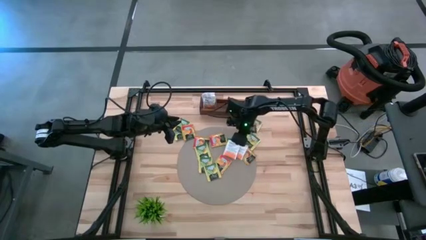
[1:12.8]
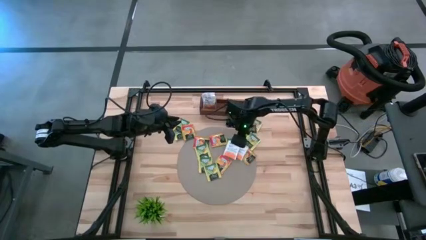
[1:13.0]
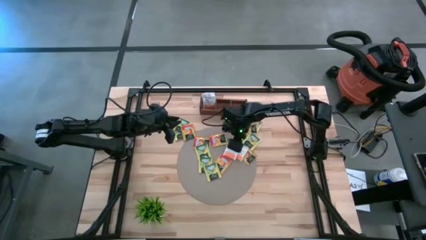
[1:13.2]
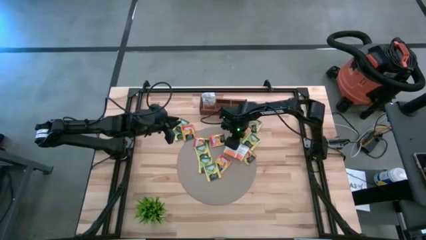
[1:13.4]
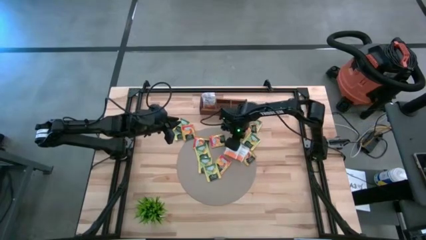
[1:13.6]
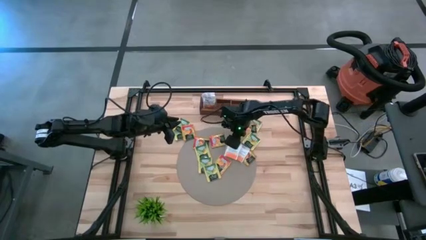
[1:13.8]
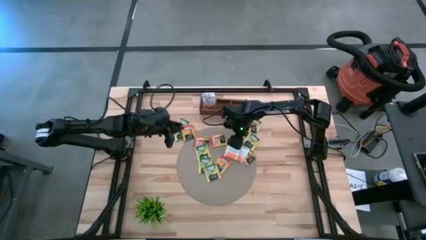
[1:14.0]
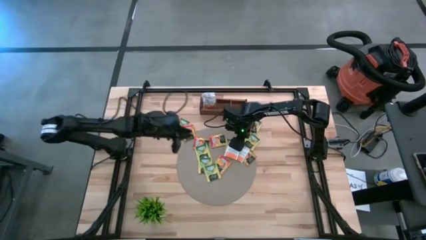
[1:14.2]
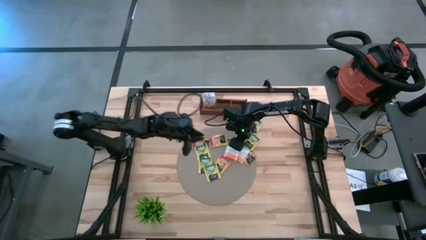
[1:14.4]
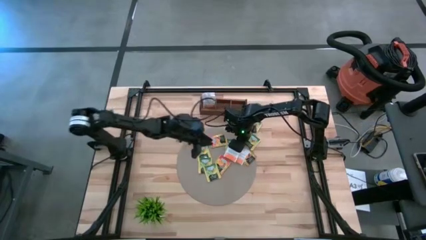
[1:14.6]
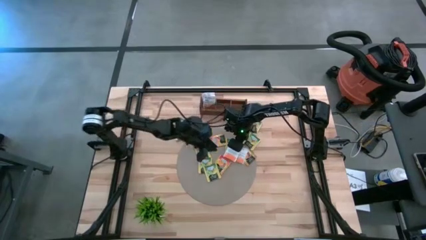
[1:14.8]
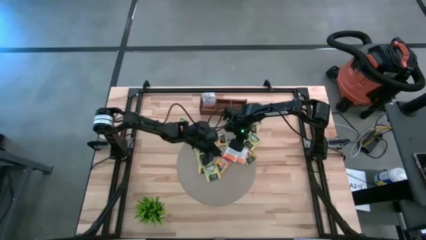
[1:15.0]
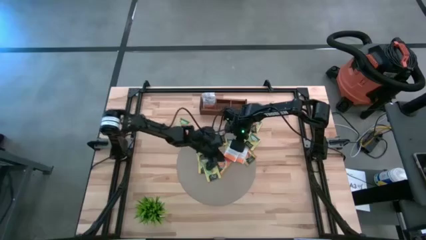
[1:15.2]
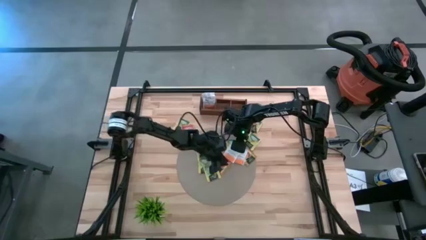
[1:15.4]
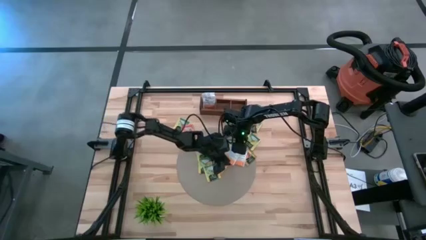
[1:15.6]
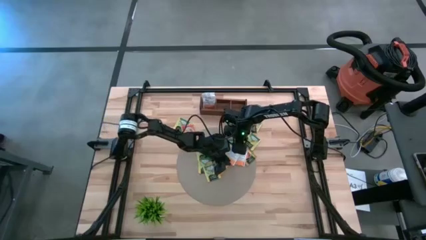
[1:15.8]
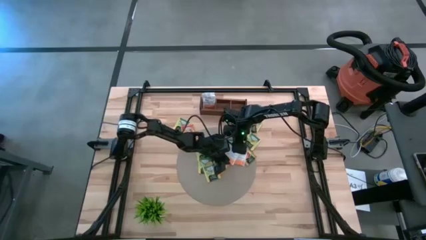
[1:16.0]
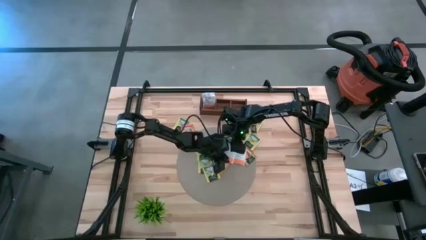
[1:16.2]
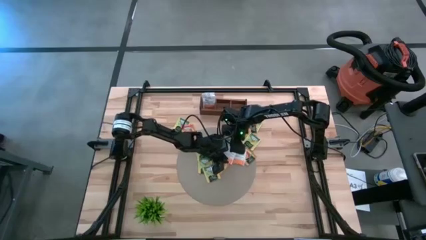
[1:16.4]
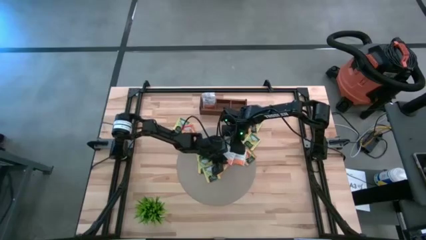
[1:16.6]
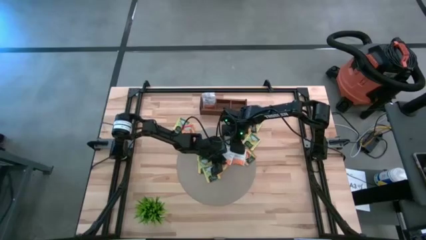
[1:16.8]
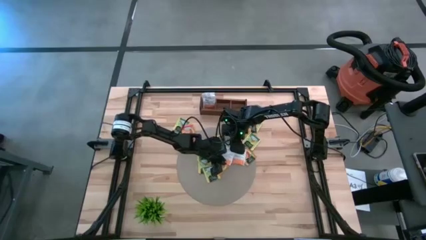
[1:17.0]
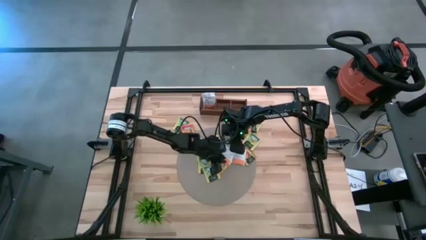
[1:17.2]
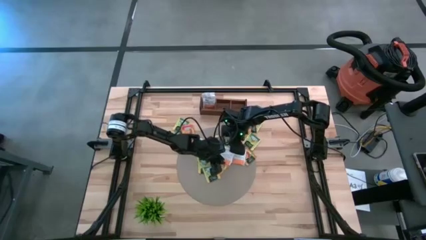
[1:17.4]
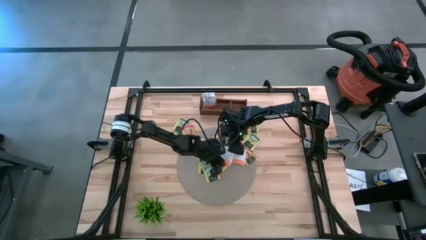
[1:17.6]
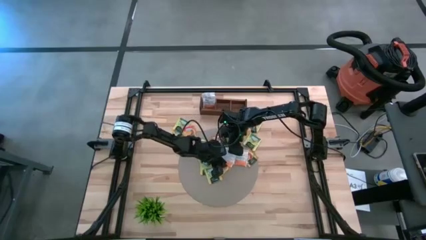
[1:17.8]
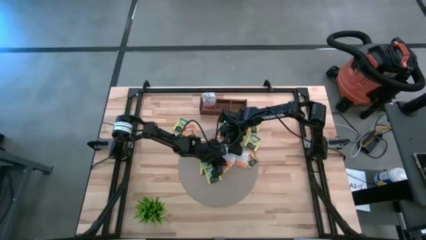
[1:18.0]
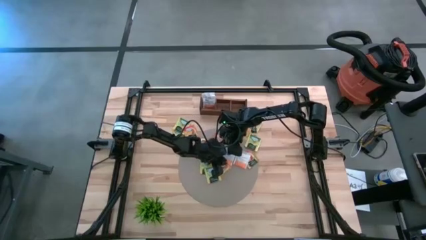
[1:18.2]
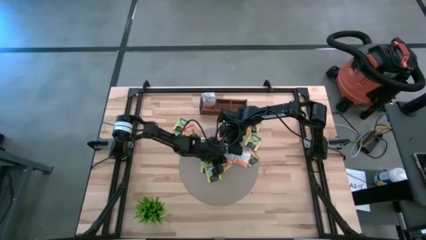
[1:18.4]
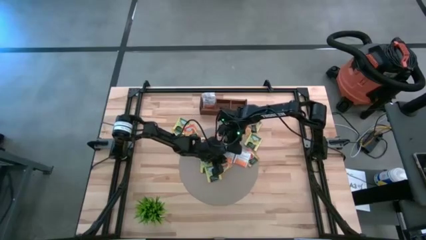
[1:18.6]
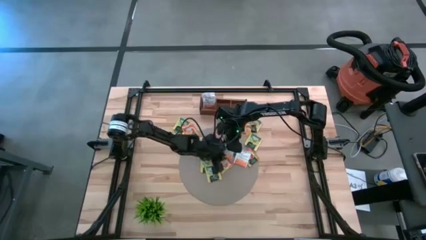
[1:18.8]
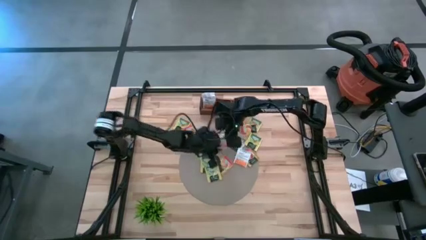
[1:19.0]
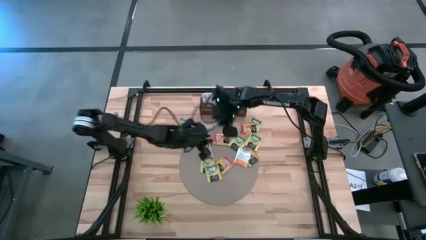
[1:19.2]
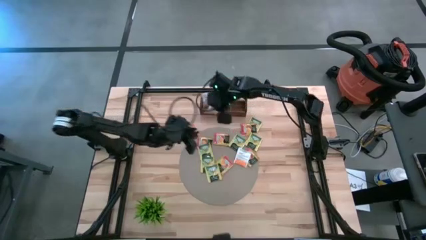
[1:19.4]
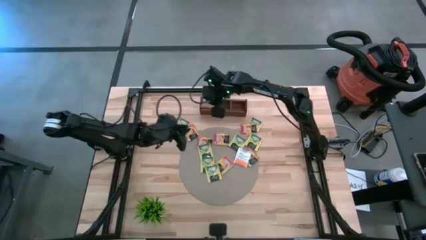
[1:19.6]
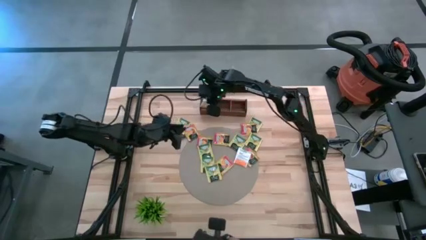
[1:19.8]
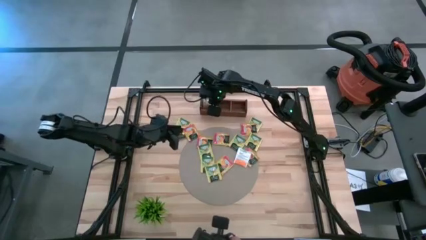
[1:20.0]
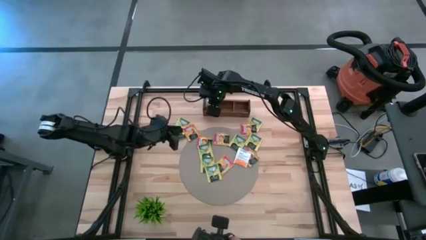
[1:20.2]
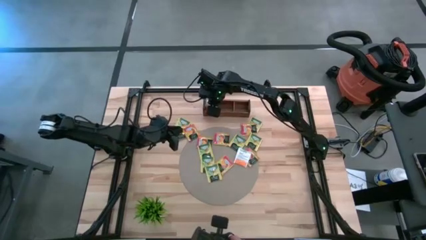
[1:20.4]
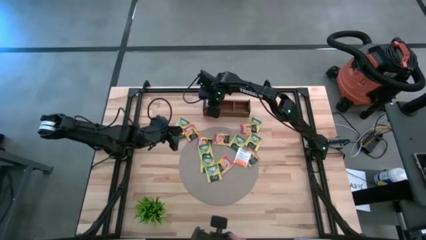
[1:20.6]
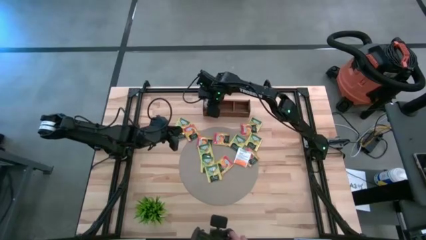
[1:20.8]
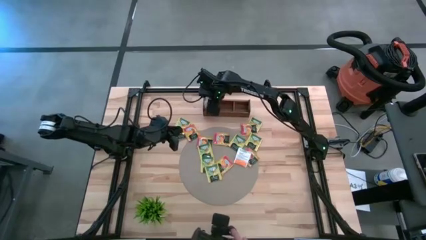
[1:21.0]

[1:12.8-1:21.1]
Task: Pick & Place Tea
Put the white tea bag into the left section of the wooden organizer

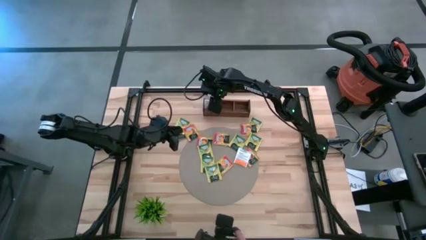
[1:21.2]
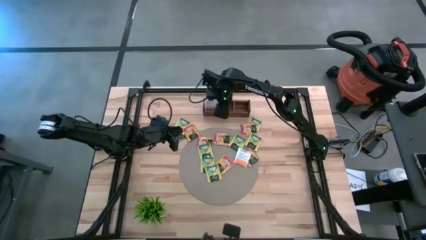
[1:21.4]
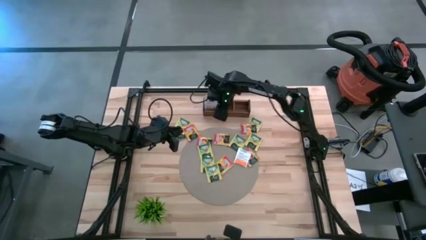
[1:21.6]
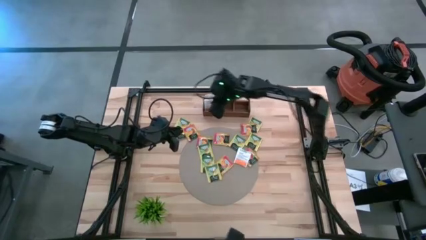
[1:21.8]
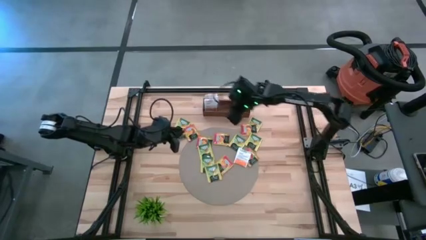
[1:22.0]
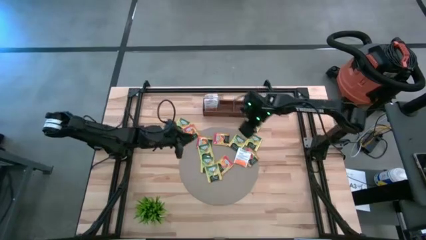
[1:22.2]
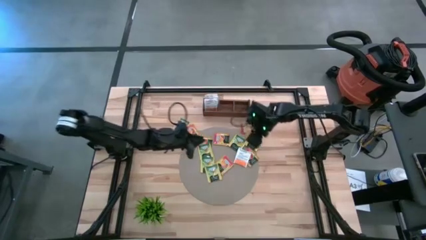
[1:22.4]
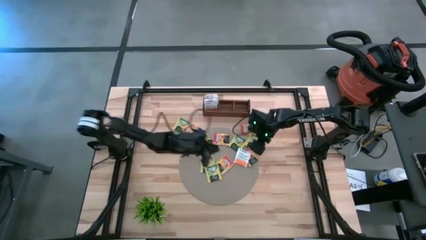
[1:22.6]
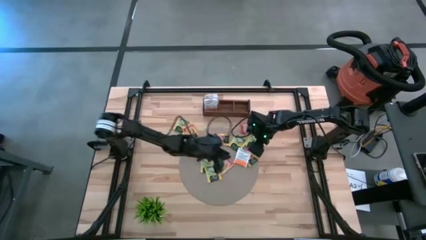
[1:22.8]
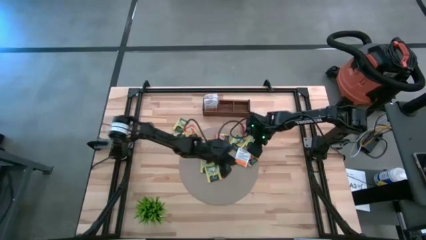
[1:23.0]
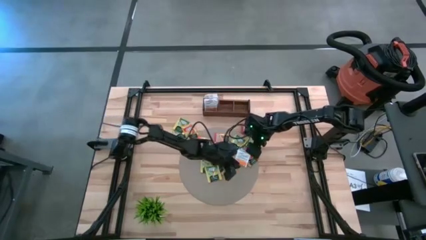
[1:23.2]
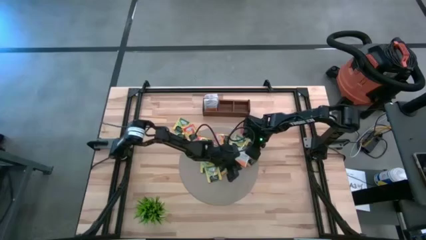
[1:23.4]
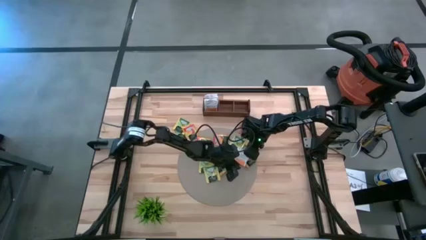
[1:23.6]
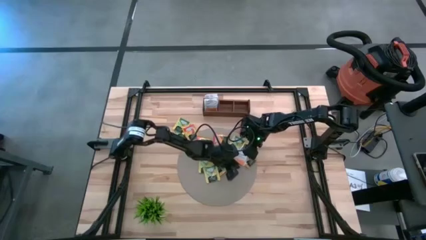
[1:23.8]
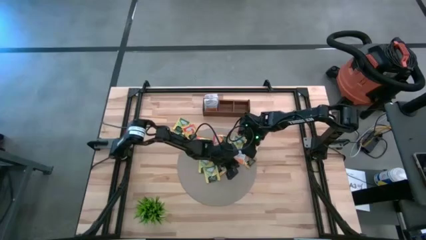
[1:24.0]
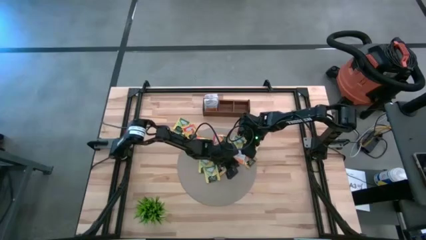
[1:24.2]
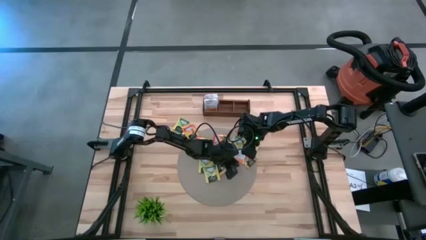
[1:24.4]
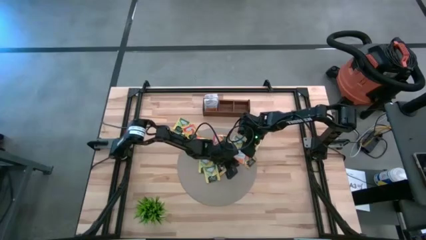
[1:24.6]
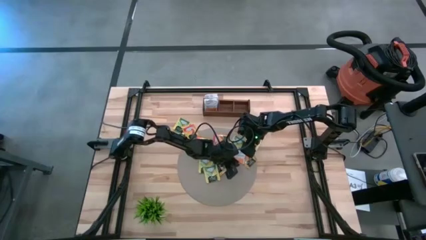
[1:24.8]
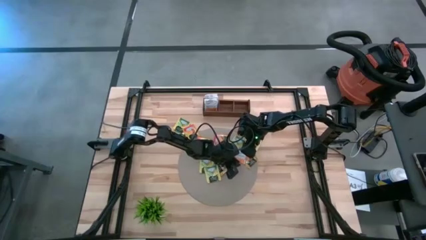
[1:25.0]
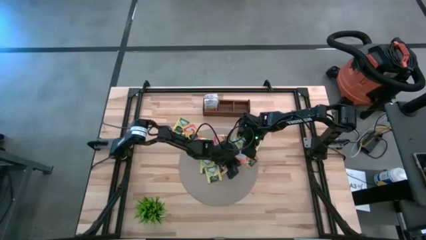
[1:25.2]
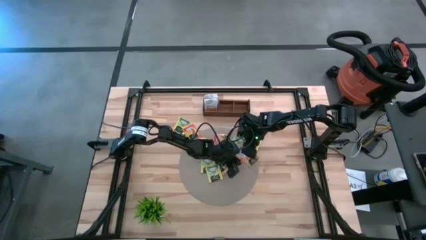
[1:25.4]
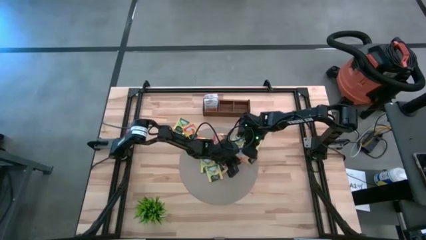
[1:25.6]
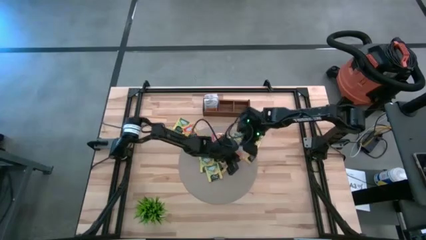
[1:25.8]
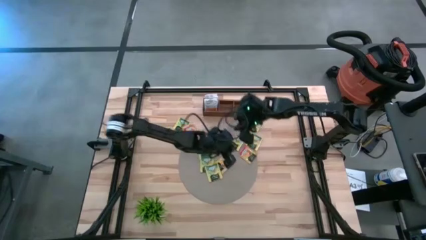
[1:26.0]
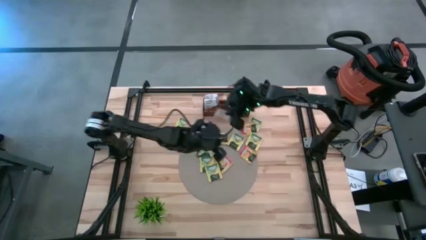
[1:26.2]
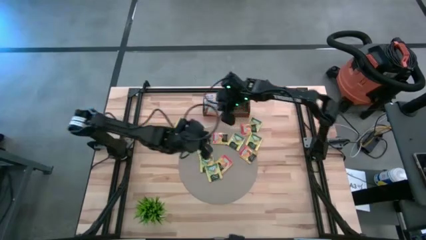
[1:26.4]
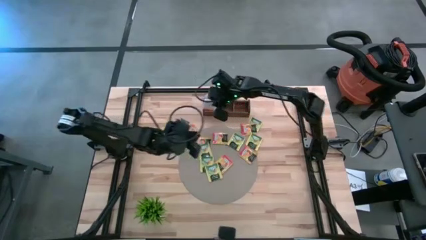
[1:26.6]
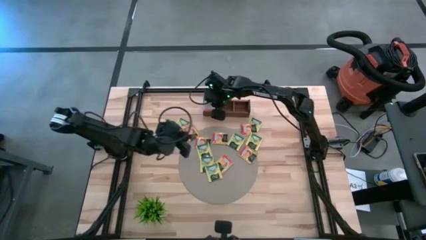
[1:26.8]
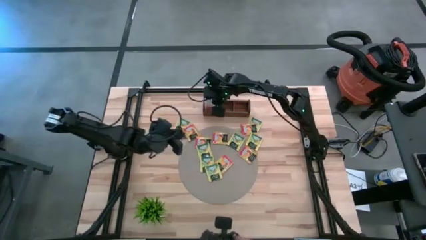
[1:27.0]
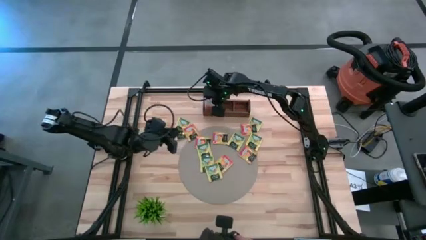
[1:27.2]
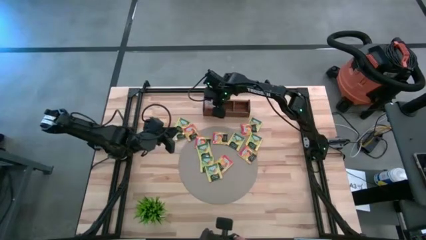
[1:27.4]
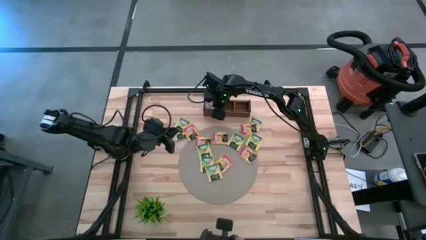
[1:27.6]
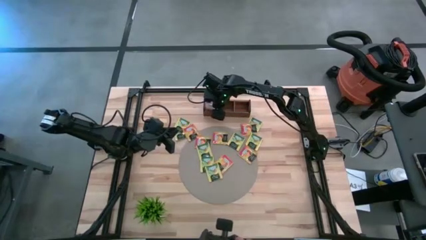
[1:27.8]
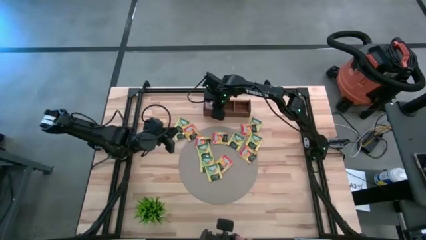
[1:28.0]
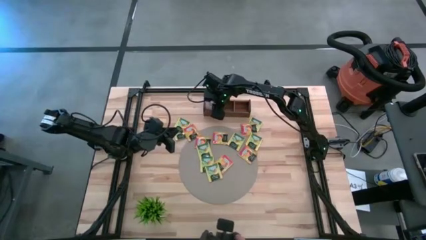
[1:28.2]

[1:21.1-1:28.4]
Put the white tea bag into the left section of the wooden organizer
